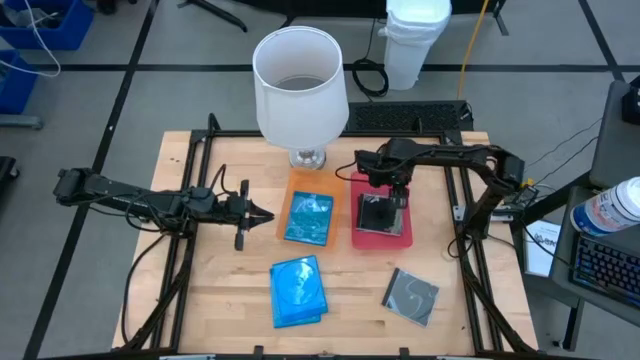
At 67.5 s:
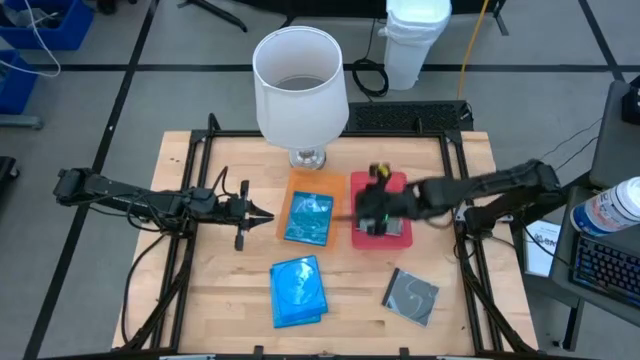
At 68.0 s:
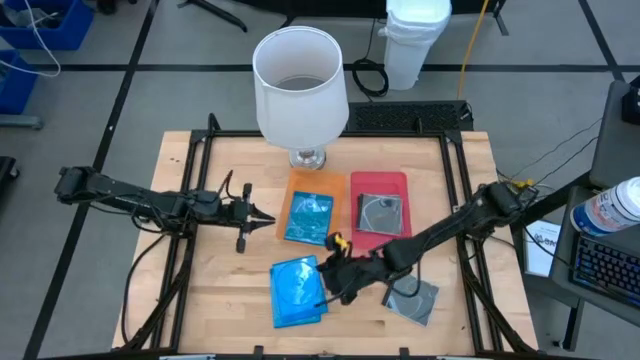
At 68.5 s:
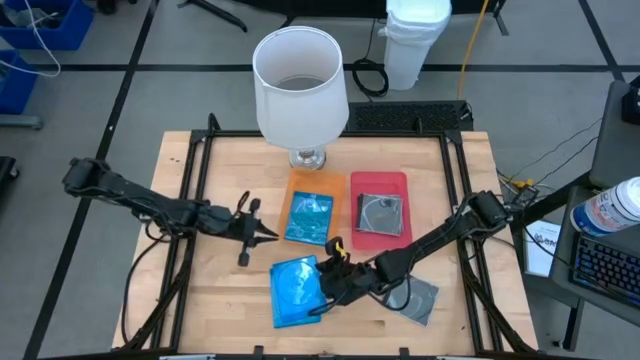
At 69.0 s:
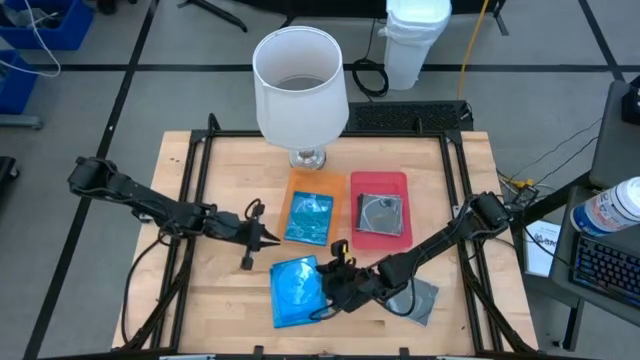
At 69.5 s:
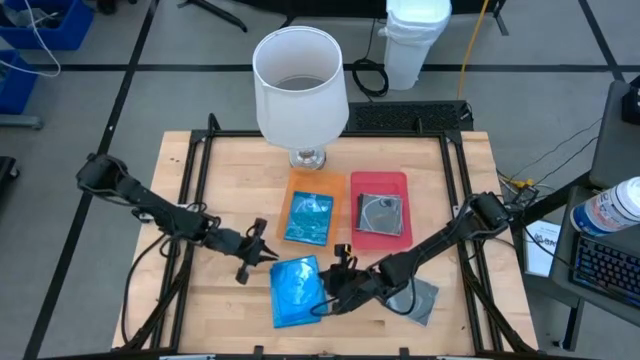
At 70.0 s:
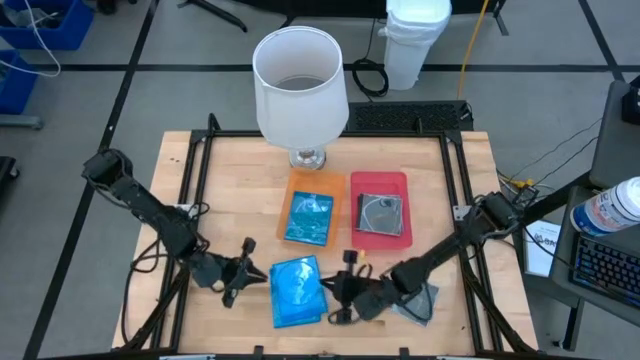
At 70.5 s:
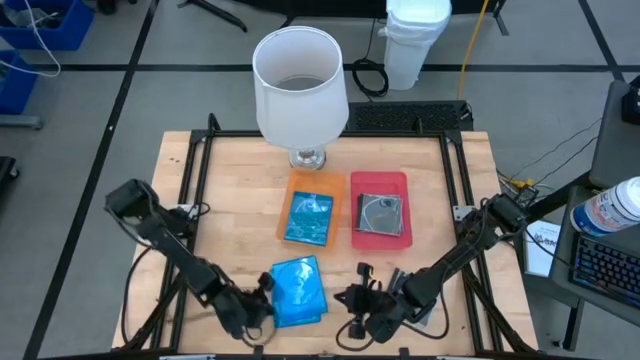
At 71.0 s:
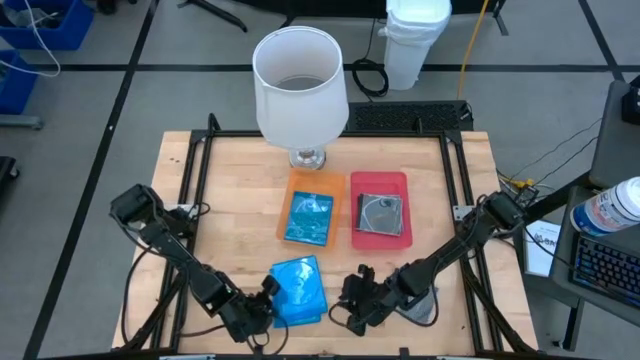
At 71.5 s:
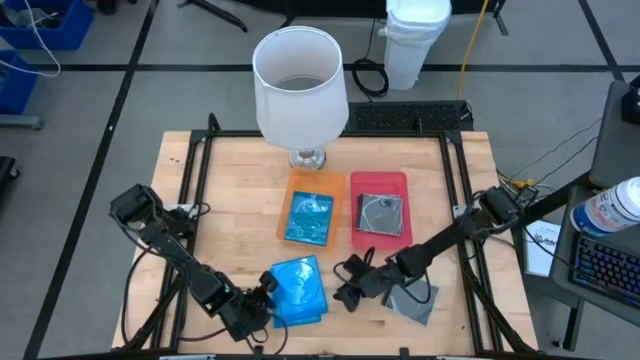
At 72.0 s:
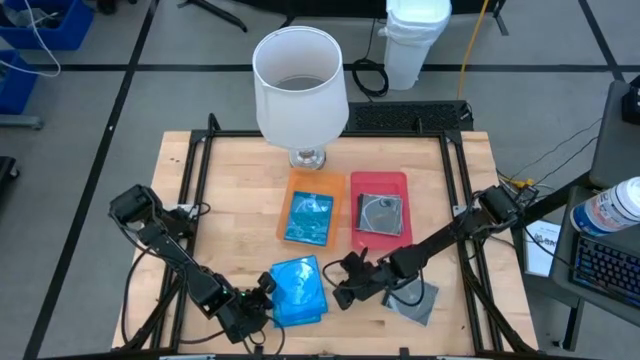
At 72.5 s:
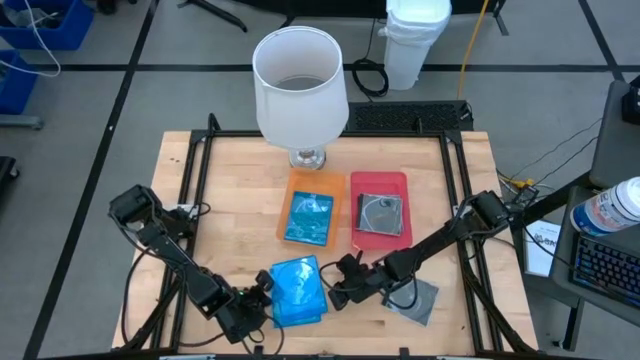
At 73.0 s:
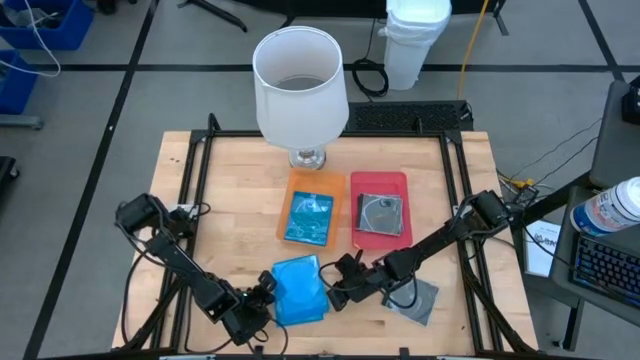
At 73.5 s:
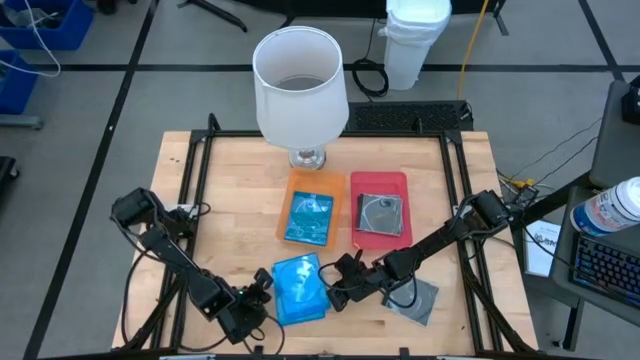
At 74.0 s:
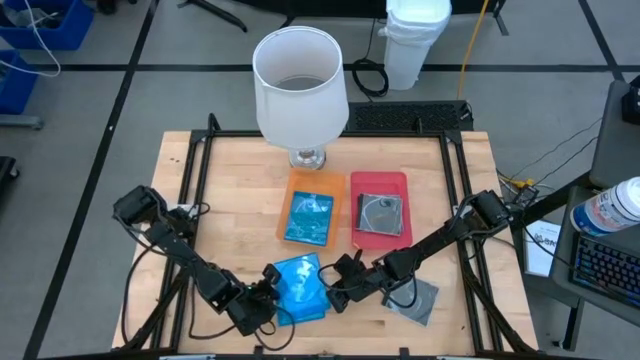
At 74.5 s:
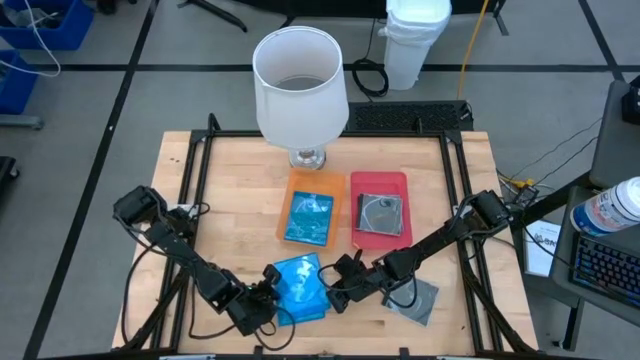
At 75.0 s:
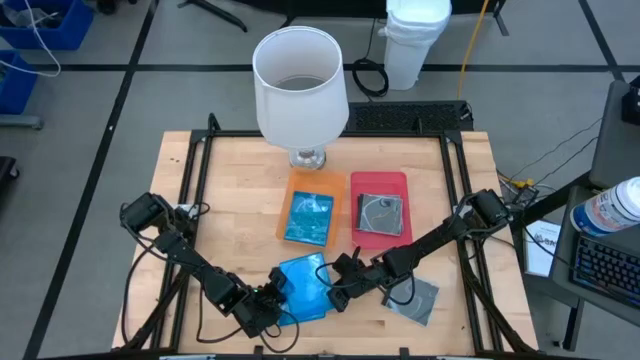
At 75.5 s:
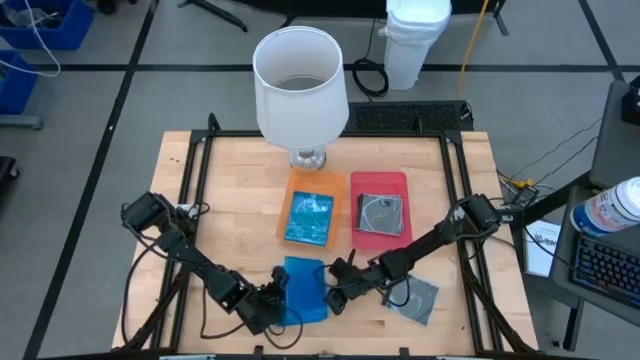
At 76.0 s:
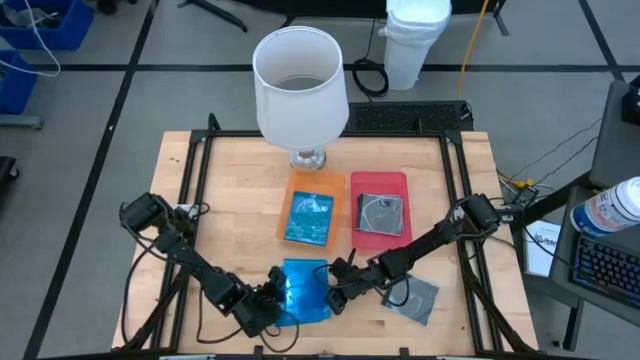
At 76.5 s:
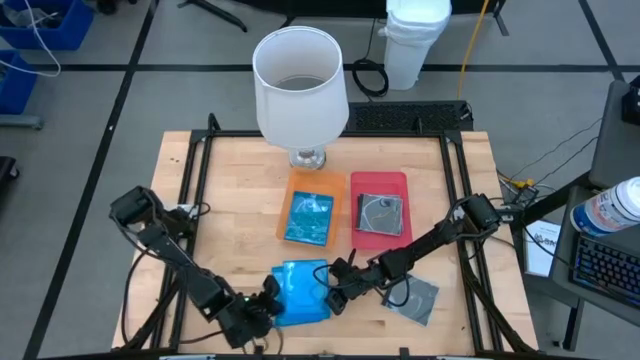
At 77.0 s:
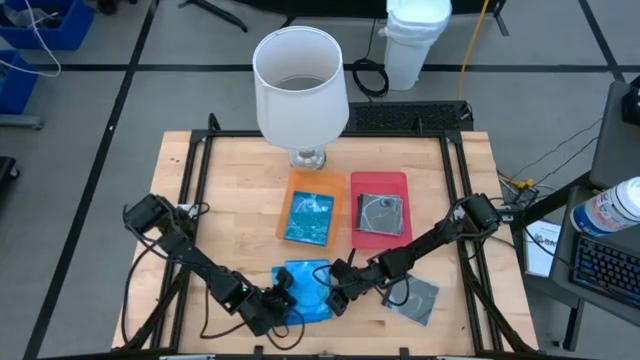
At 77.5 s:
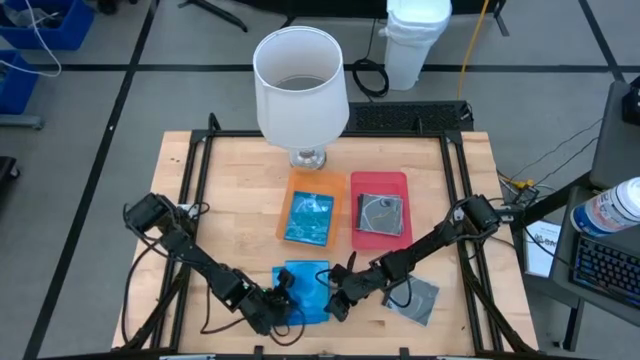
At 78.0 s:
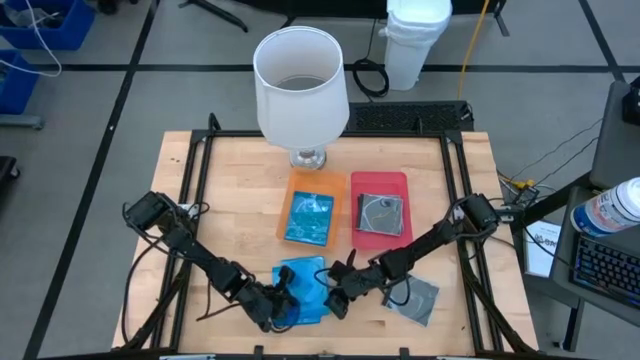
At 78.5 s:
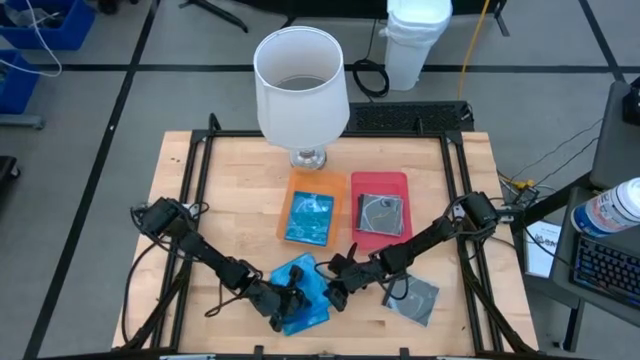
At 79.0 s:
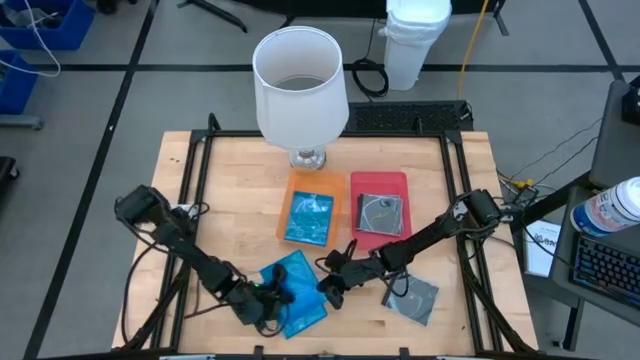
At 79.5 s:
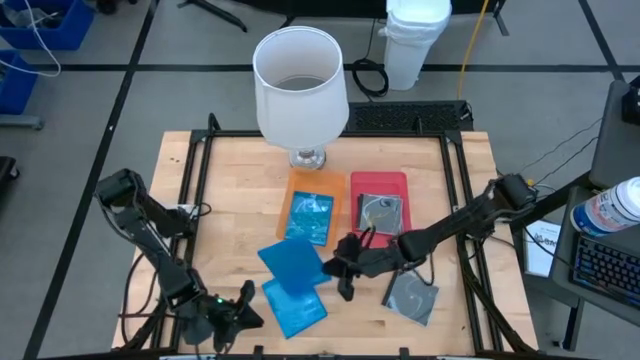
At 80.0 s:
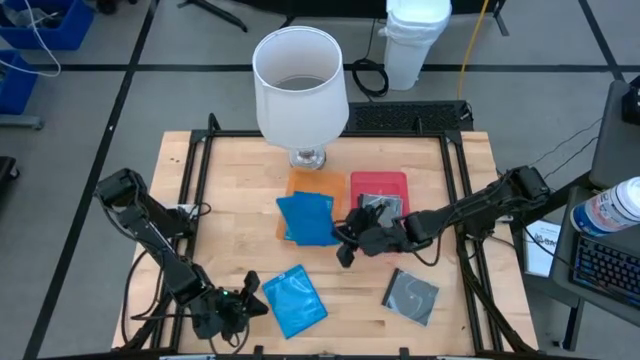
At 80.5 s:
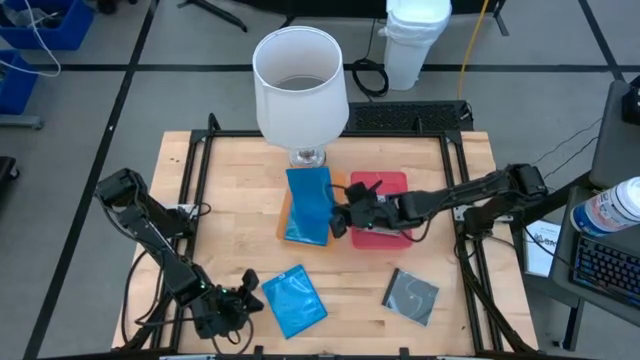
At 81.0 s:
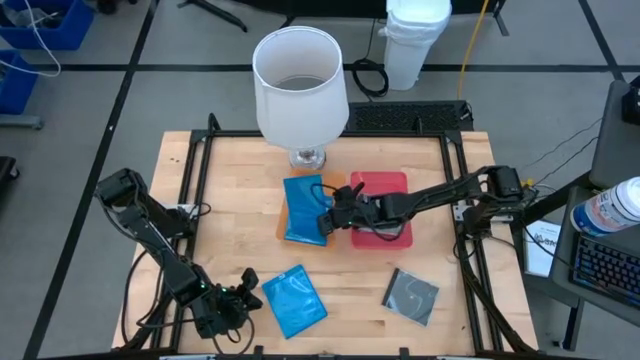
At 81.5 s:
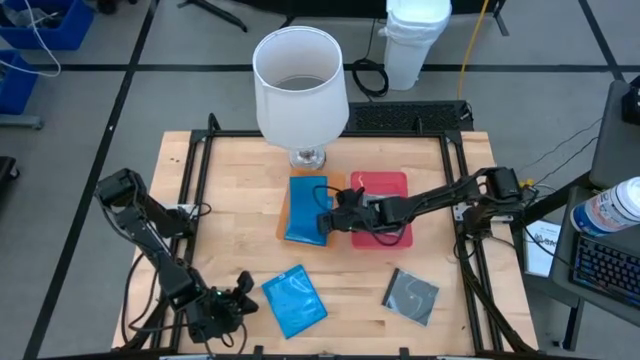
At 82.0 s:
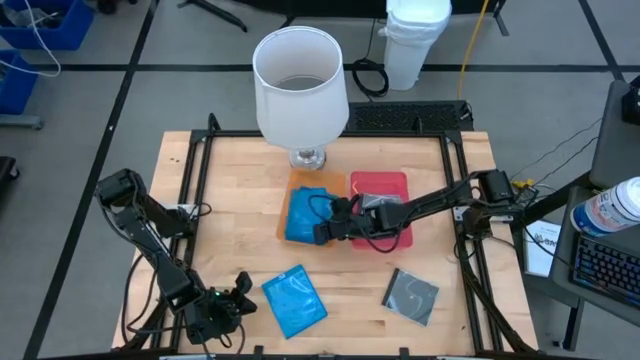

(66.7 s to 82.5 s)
Task: Pick & place jewel cases by type
Put the blue CD case into the orange bin

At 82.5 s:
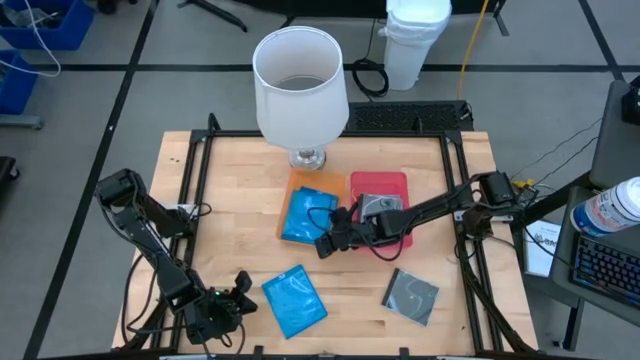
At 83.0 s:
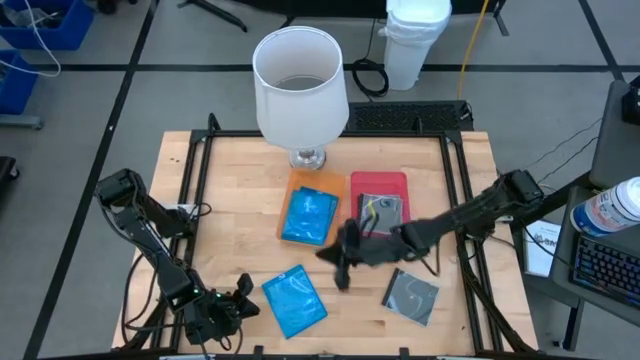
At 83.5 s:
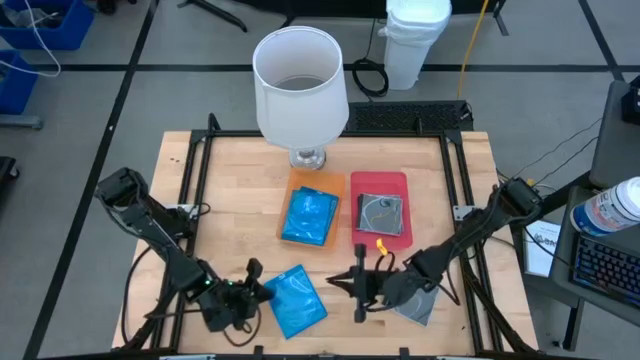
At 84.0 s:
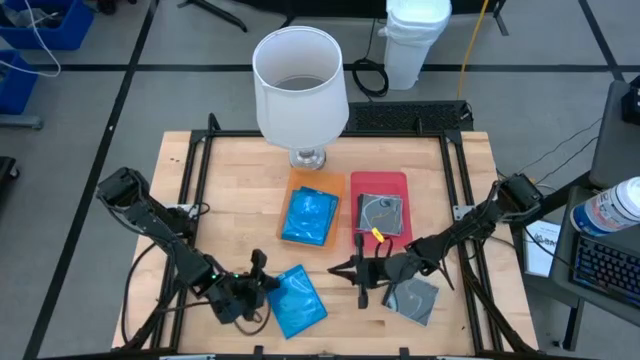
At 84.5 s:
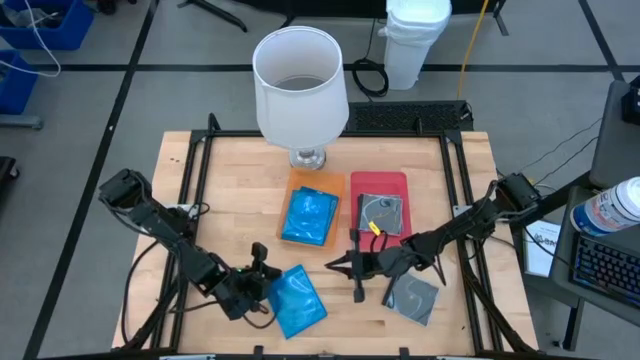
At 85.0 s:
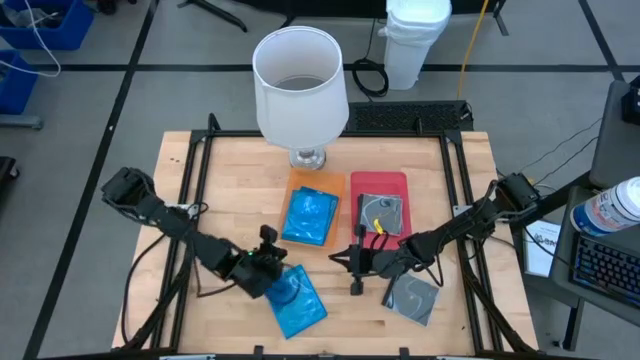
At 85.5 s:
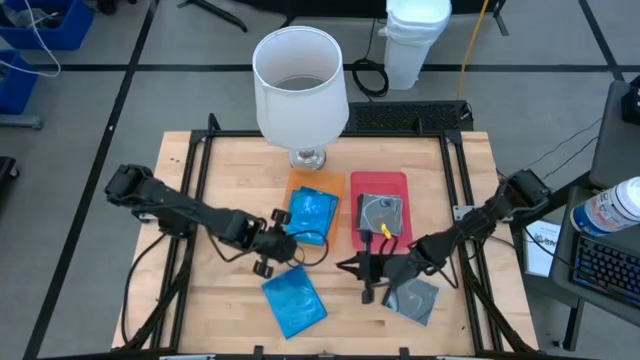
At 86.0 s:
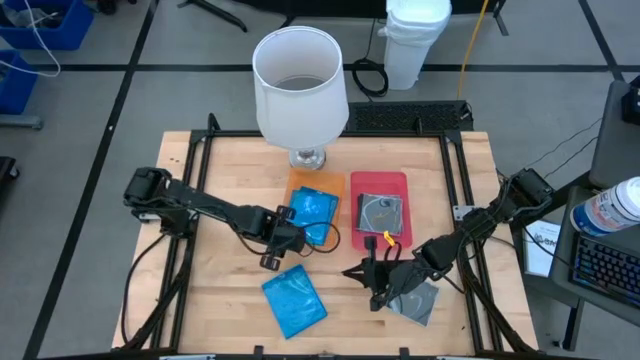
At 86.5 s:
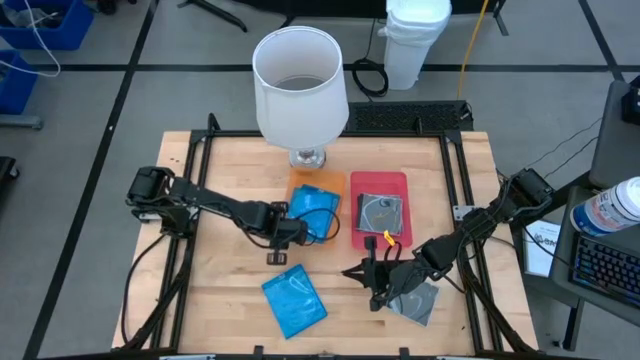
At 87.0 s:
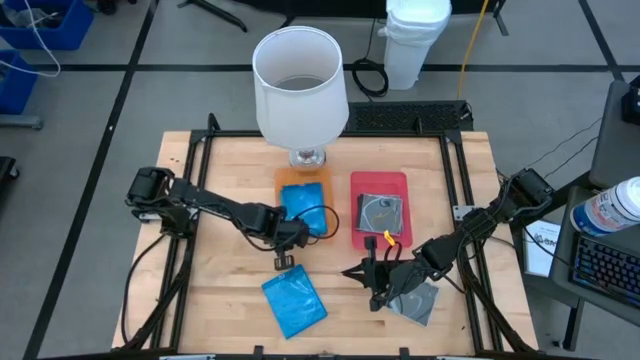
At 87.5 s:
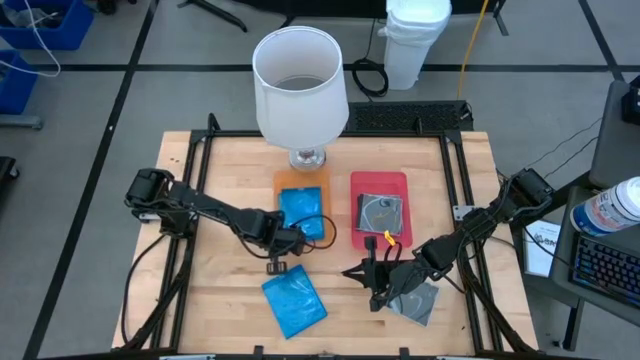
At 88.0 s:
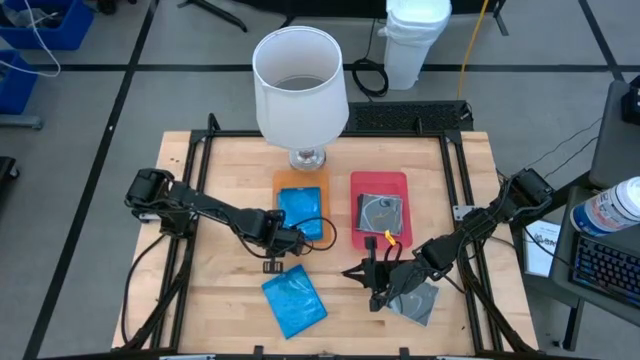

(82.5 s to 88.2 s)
Adjust the orange bin
